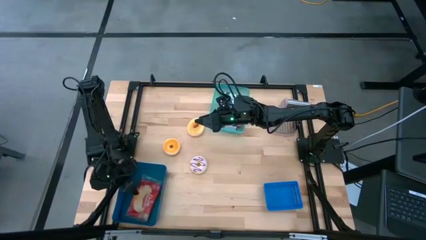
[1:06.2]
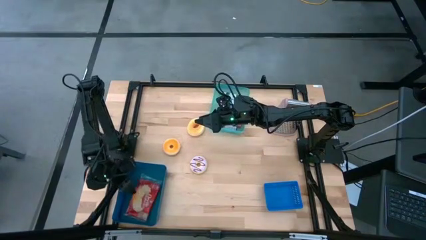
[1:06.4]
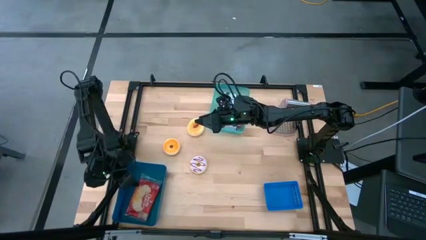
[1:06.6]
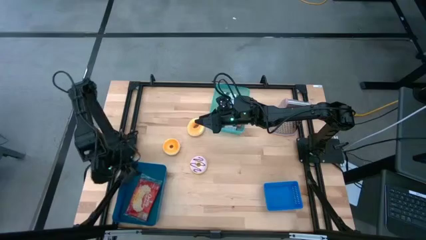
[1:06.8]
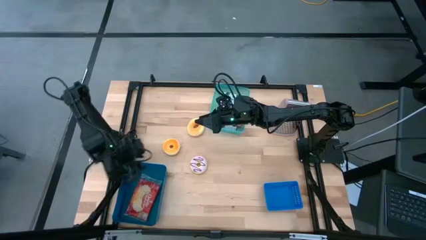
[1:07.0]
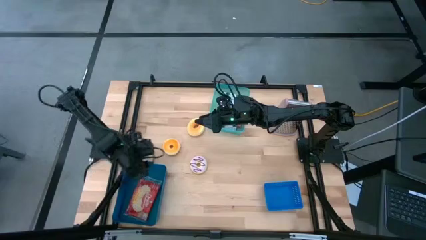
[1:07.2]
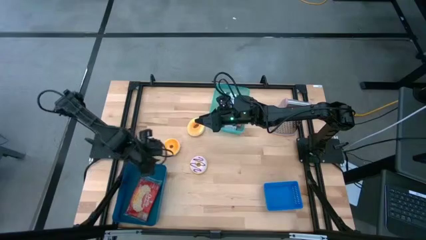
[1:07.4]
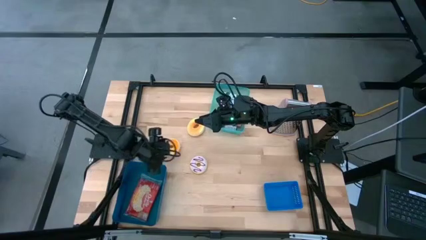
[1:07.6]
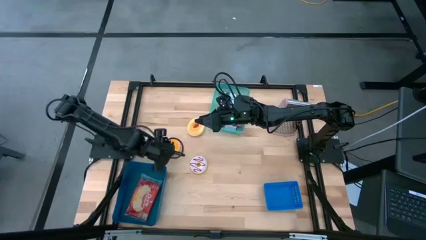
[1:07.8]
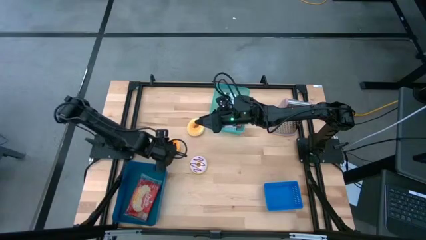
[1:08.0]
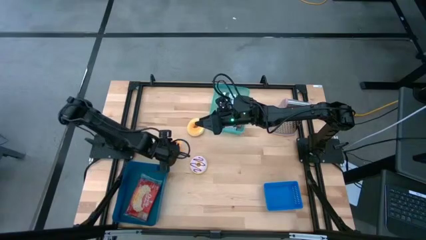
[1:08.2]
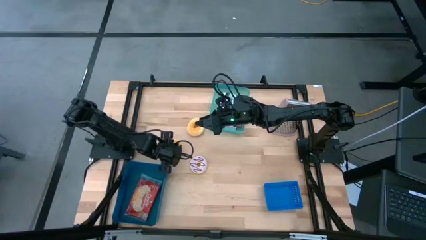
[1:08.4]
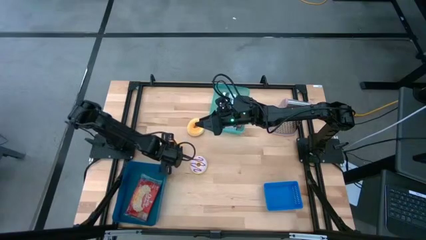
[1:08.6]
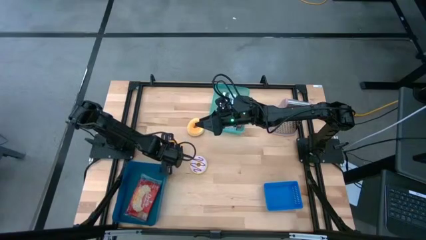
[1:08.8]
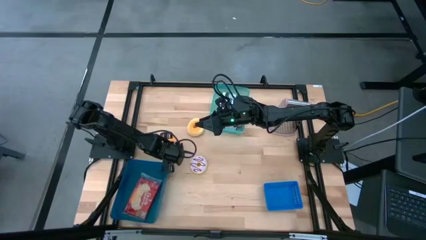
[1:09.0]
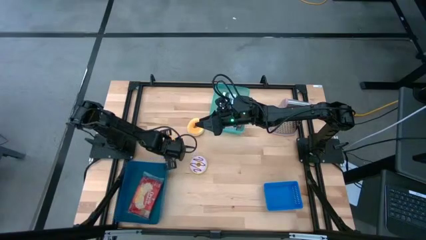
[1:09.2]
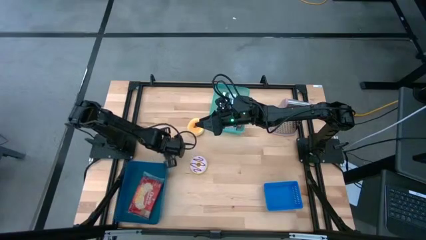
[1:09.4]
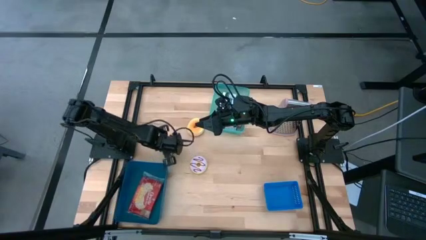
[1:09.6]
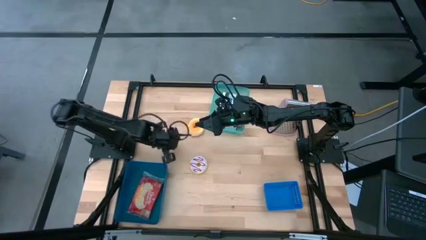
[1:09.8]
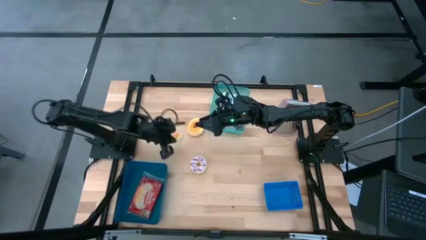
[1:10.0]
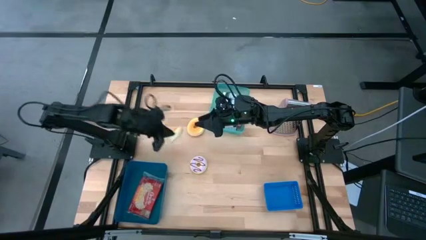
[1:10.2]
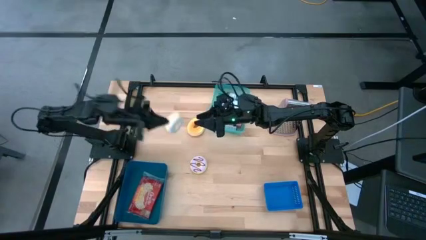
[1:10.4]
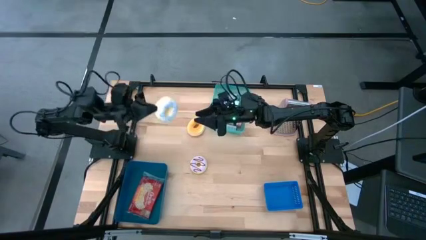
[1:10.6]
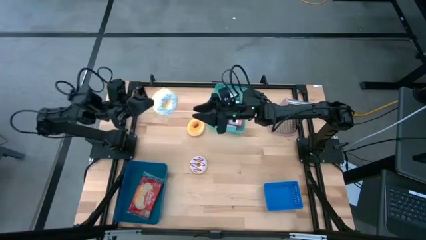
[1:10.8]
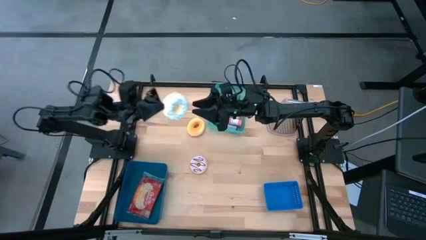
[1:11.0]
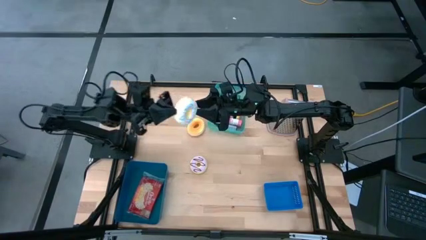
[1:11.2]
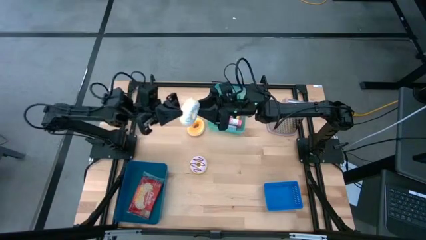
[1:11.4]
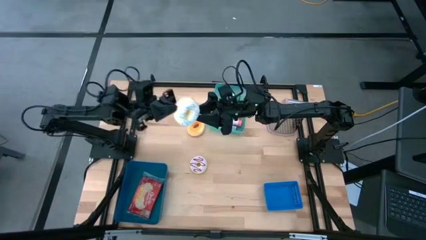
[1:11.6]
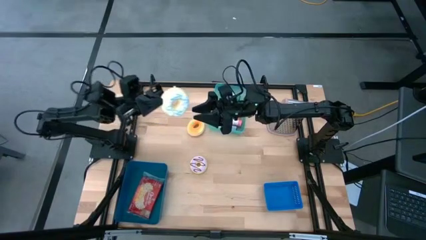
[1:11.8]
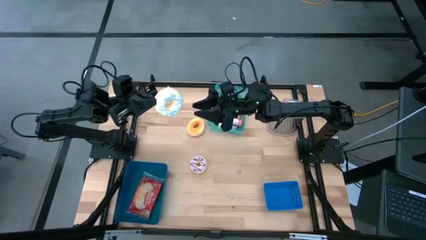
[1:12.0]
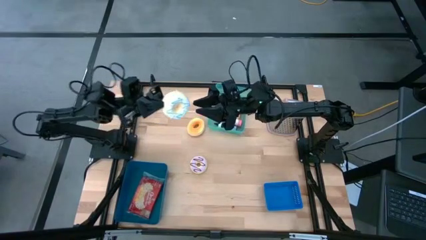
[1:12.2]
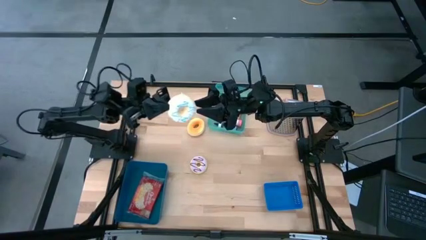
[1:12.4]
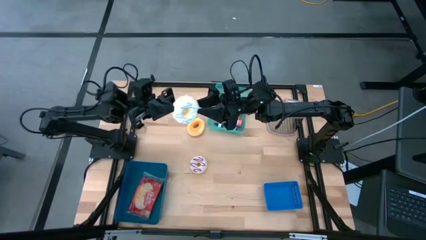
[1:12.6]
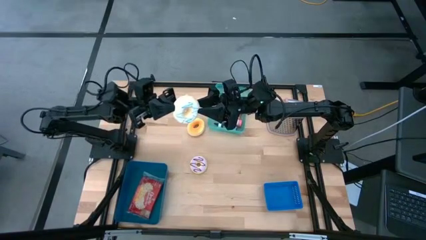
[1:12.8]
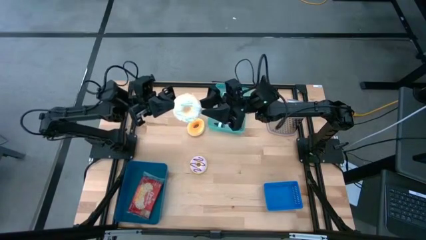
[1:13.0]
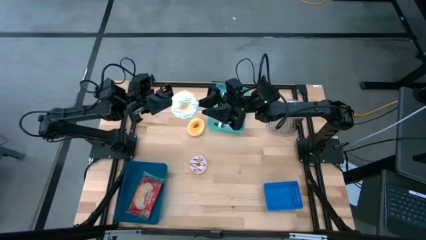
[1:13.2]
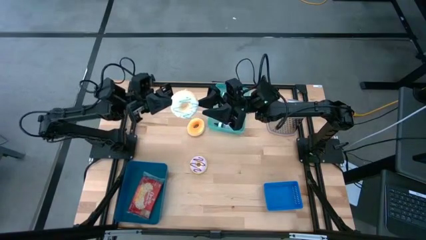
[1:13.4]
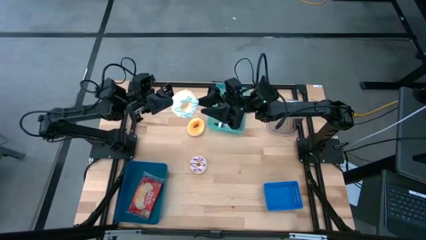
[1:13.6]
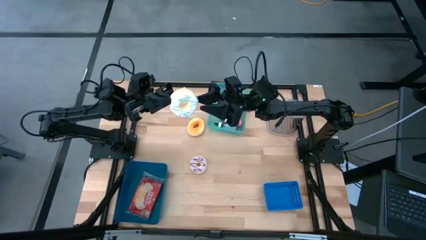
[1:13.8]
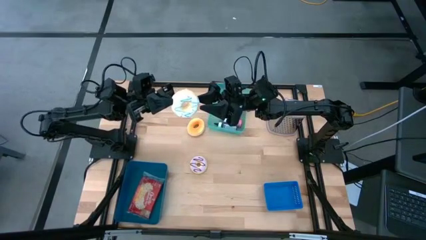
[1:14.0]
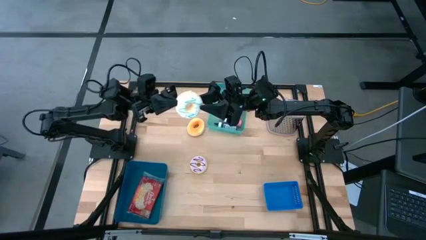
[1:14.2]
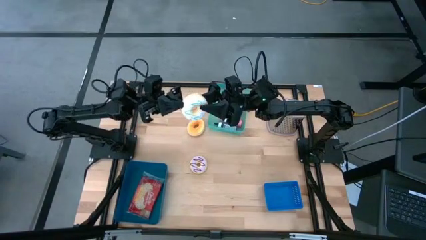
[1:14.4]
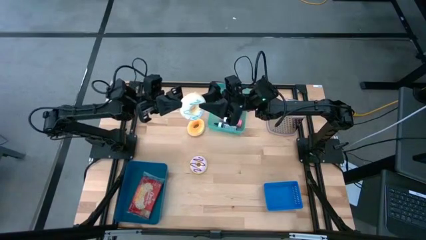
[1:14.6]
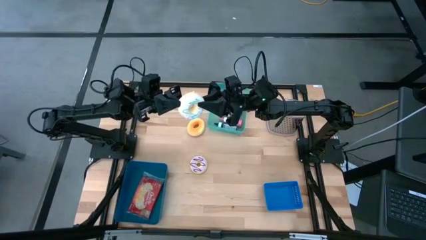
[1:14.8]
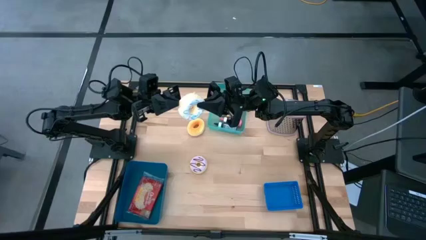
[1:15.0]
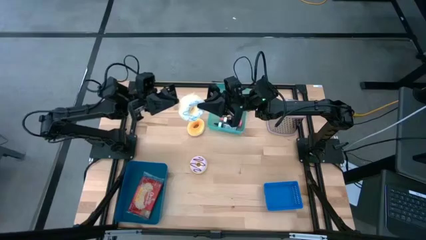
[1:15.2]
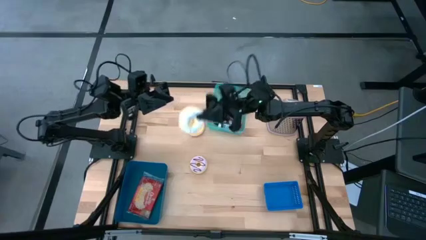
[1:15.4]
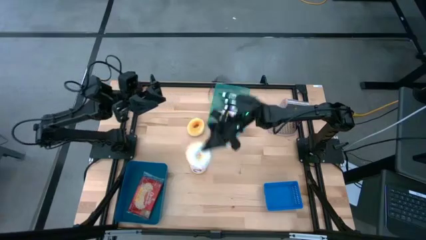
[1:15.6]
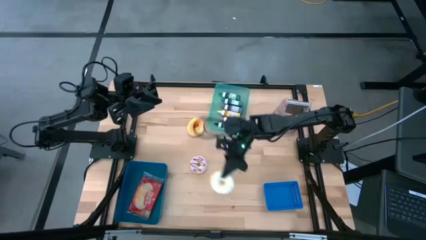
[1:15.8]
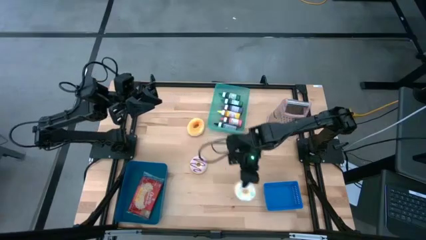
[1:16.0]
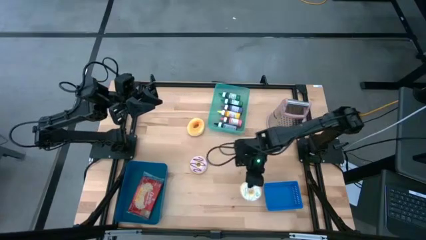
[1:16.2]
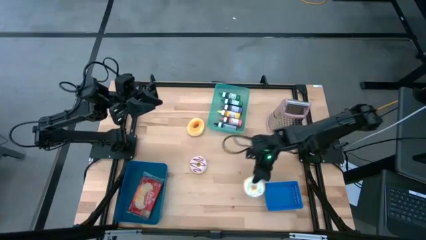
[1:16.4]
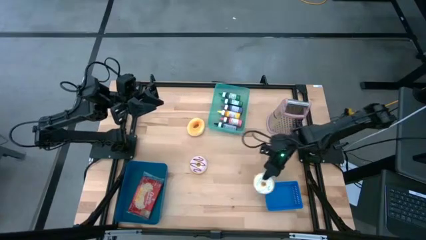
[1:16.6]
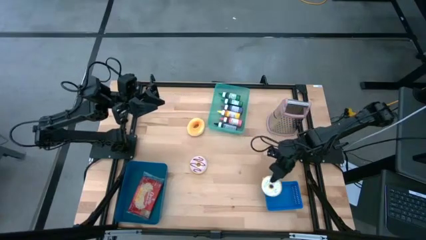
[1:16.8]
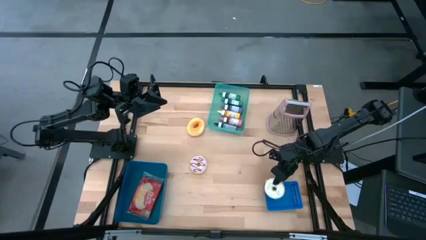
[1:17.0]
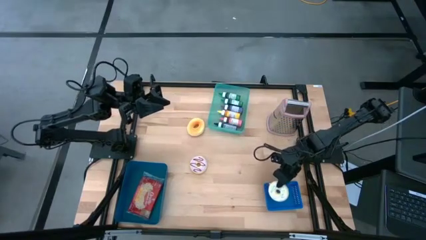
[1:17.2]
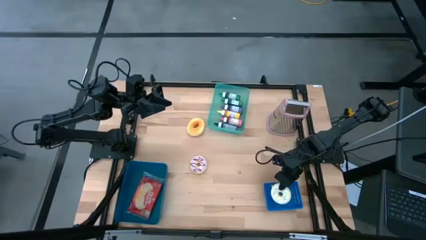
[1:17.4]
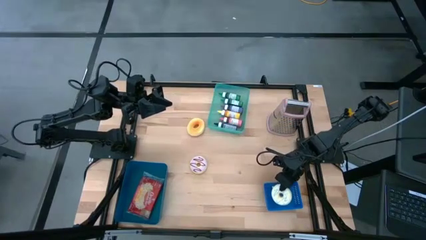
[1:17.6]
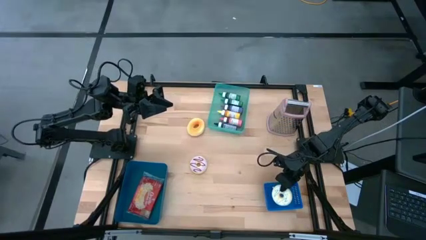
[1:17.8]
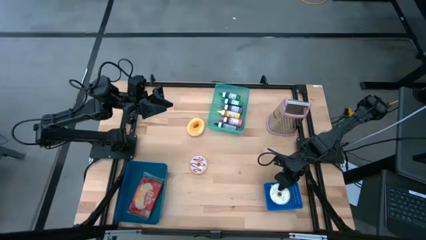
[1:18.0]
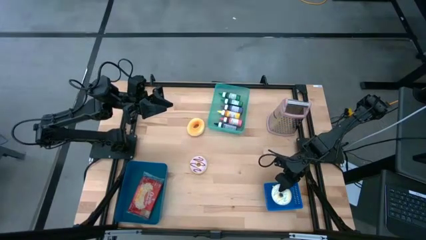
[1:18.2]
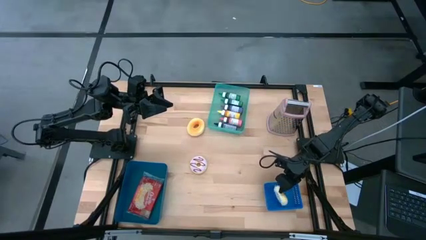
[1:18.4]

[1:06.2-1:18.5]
Put the white donut into the blue bin
